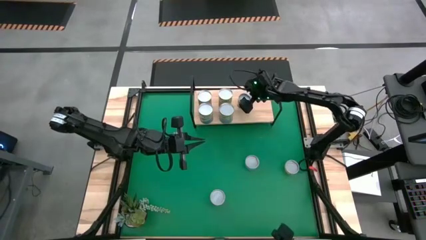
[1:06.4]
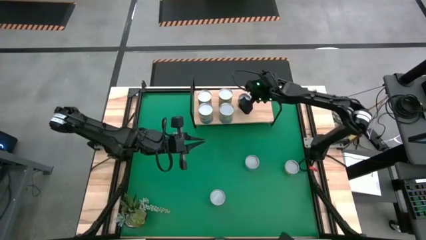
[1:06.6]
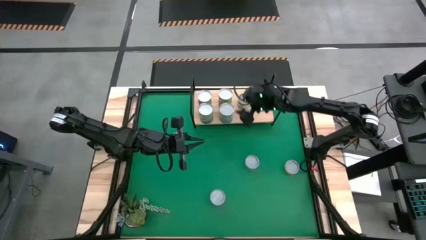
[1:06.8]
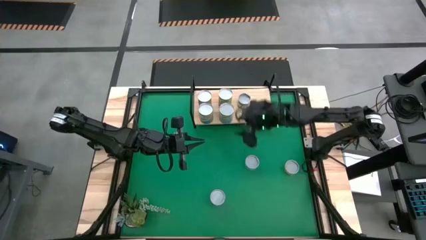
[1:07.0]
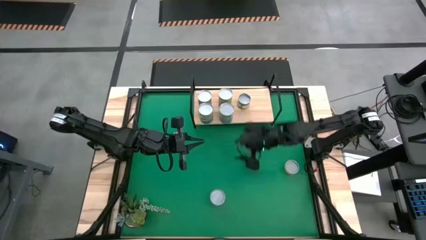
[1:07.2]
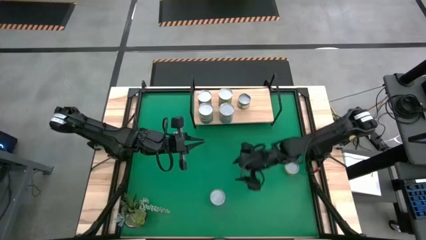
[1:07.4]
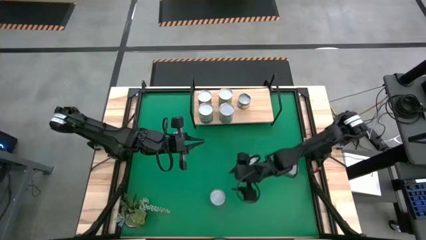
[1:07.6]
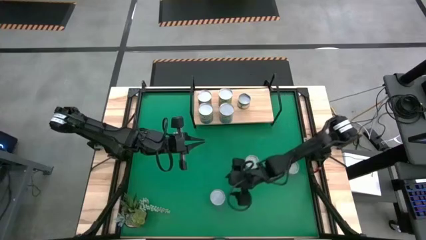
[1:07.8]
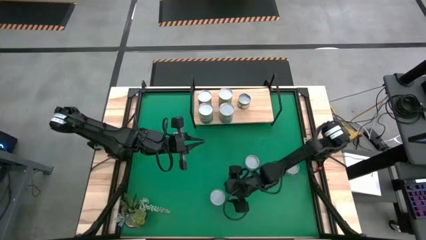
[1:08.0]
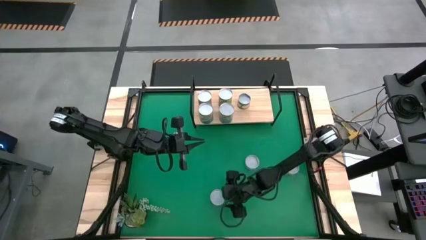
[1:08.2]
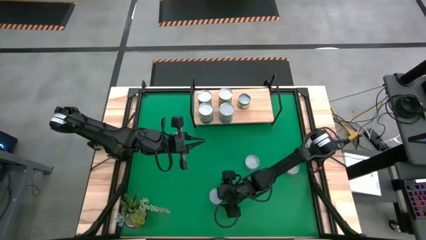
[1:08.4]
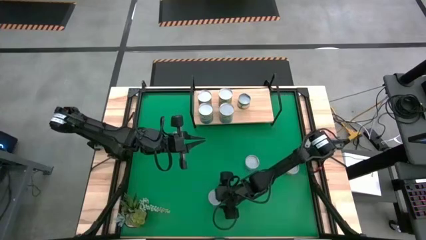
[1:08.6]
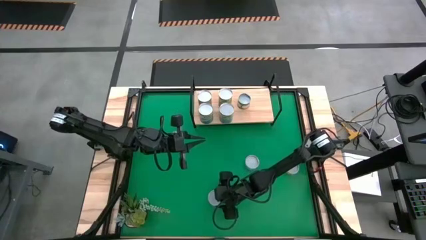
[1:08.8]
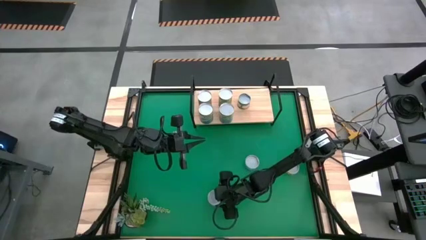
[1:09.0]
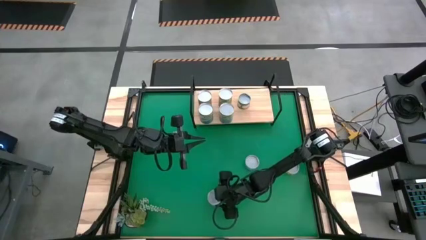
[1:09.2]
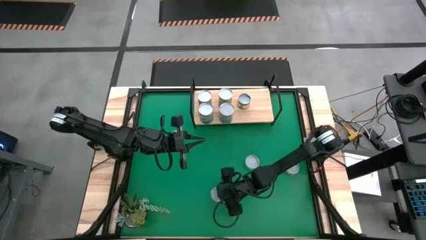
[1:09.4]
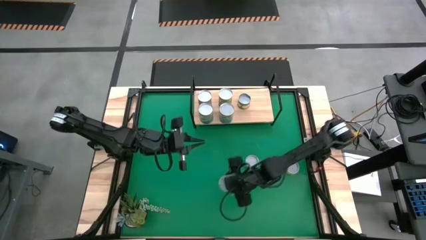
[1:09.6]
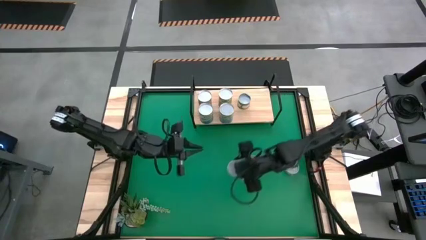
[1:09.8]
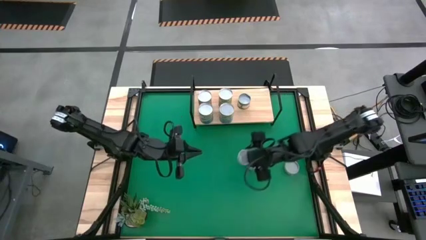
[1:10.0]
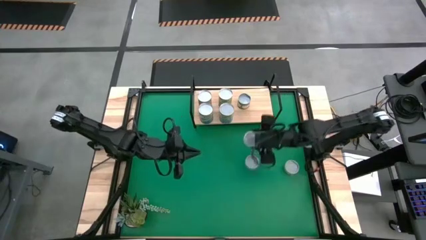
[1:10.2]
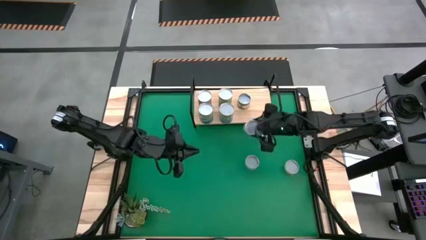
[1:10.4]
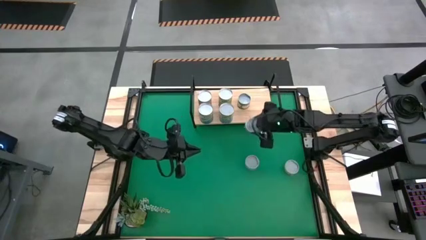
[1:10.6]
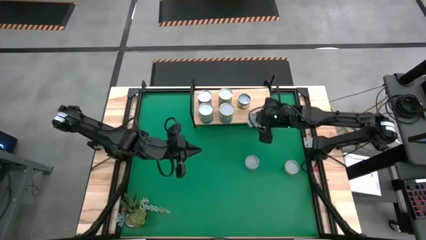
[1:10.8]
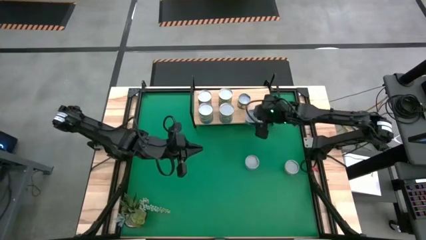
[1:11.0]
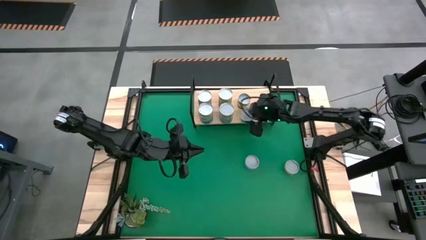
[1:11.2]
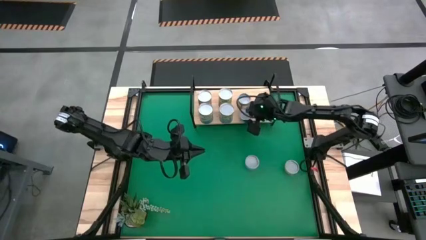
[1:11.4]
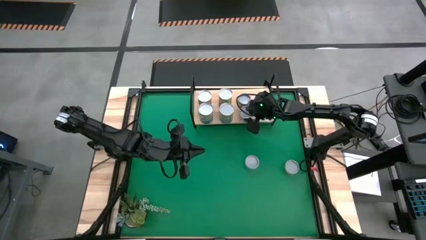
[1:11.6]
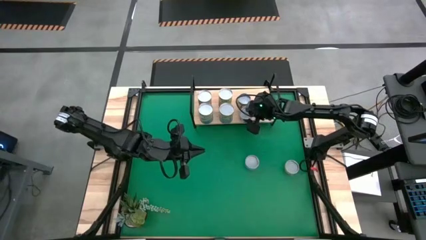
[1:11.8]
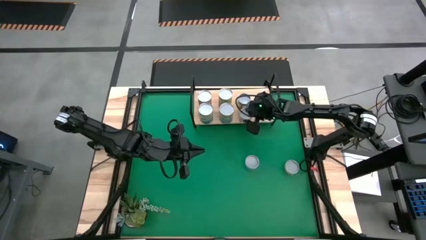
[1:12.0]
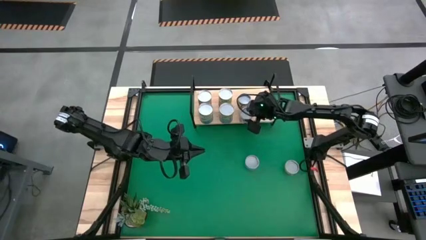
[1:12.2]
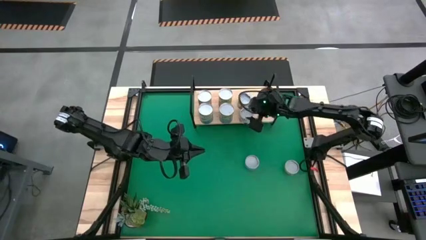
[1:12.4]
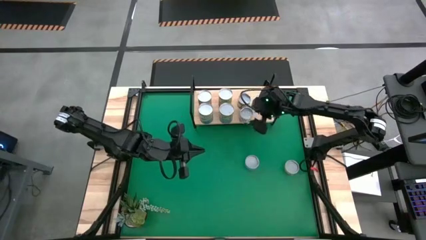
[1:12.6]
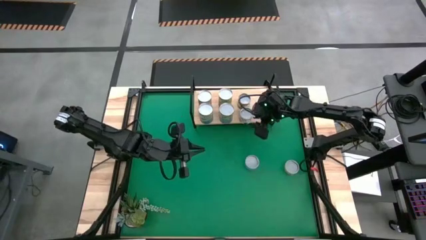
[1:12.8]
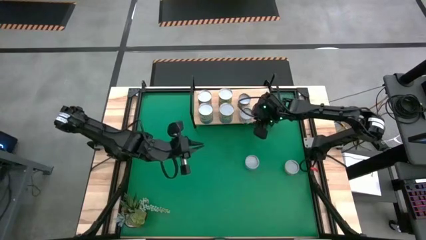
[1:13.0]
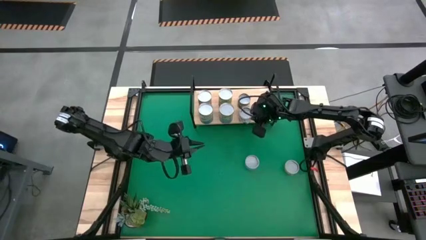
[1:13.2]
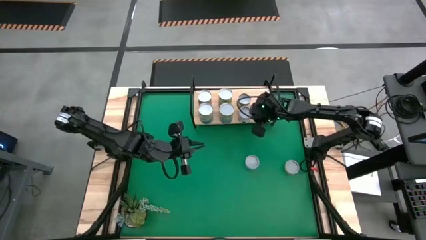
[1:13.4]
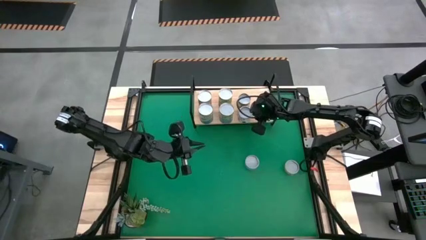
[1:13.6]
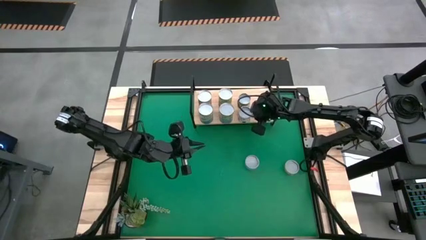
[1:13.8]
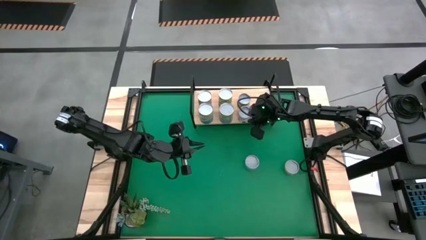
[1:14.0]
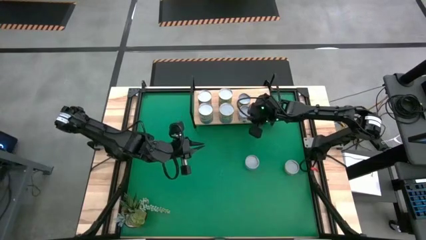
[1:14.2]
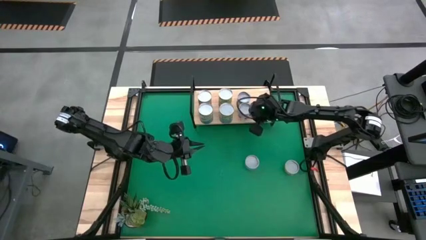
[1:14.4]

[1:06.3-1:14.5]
Task: Pick and place cans onto a shelf
Put the canned spaghetti sauce on the shelf

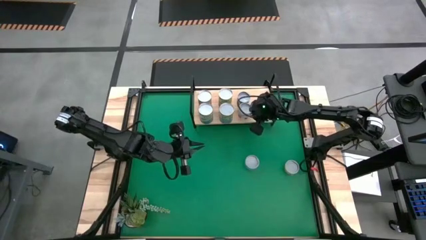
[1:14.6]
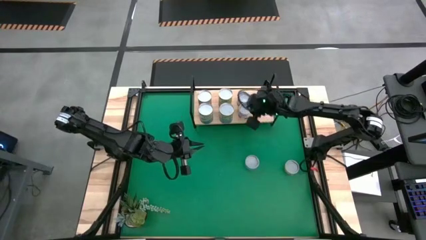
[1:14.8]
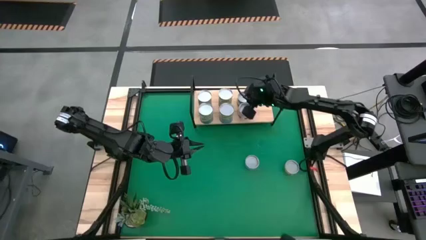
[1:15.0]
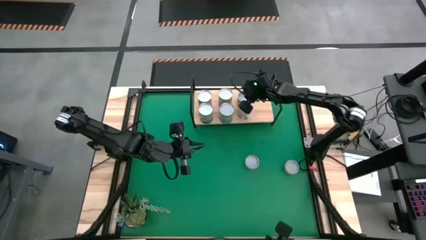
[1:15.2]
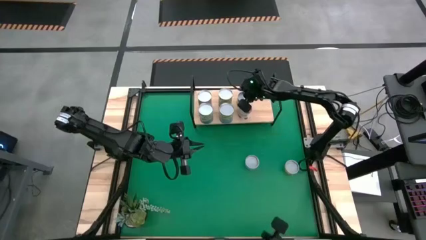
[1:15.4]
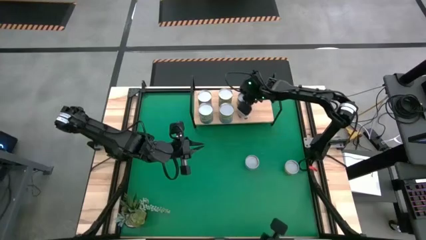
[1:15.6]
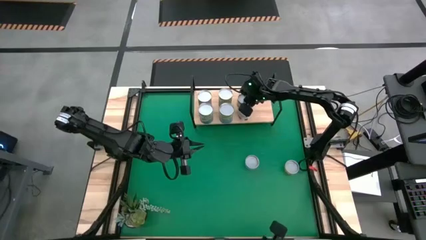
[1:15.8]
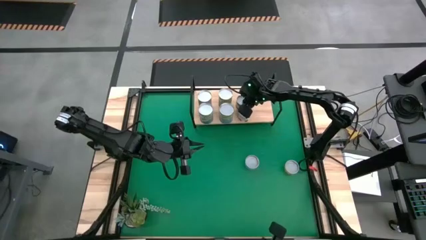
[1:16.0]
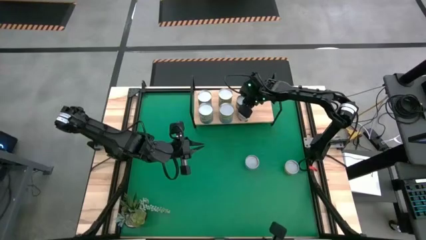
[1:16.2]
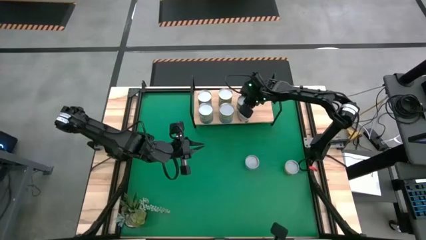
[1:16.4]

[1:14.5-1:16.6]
Adjust the canned peaches on the shelf

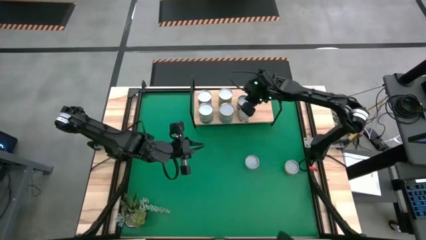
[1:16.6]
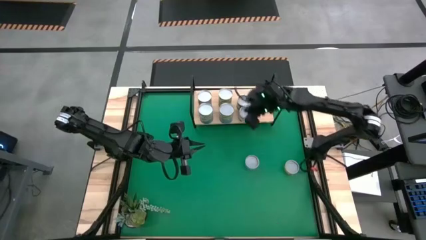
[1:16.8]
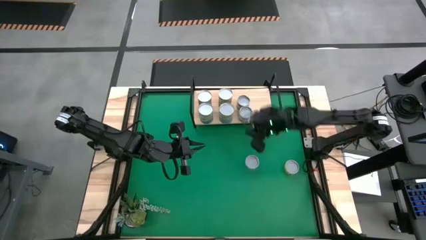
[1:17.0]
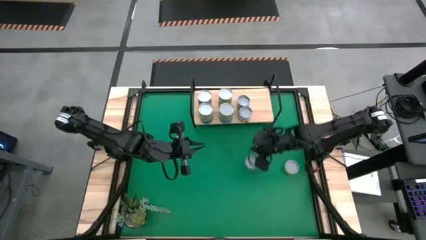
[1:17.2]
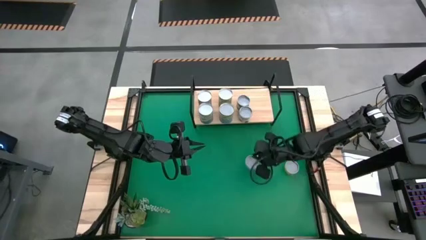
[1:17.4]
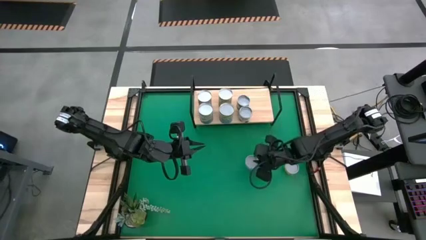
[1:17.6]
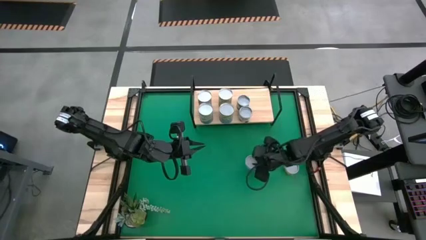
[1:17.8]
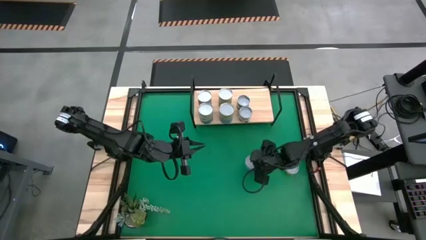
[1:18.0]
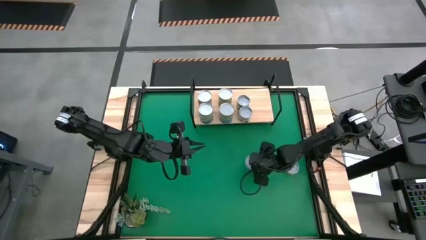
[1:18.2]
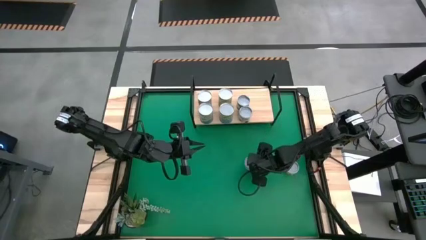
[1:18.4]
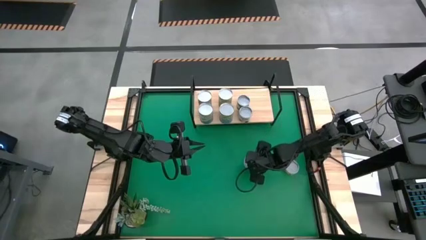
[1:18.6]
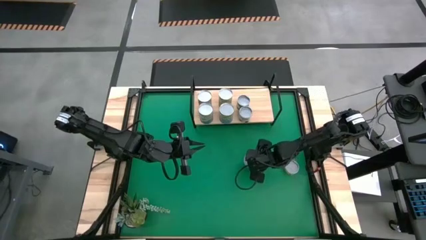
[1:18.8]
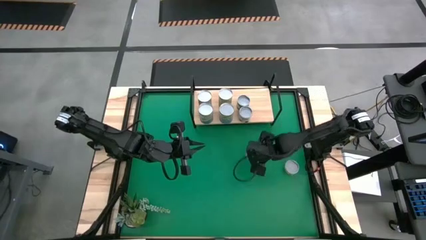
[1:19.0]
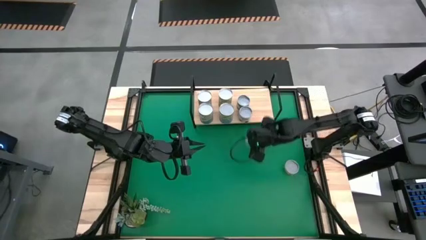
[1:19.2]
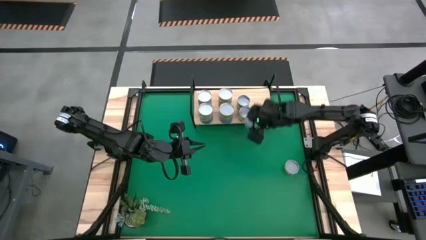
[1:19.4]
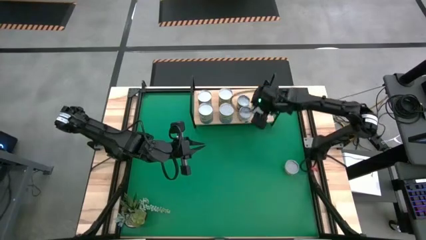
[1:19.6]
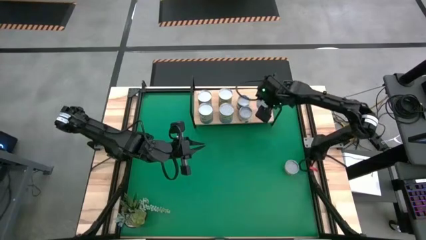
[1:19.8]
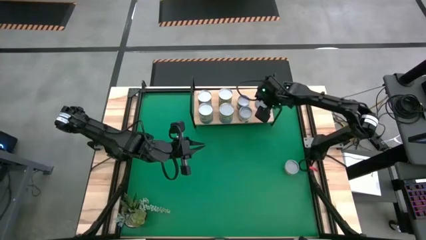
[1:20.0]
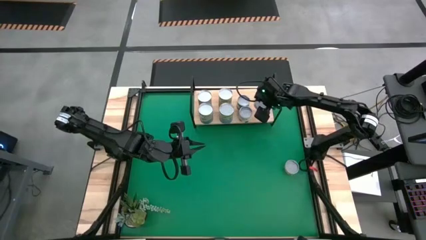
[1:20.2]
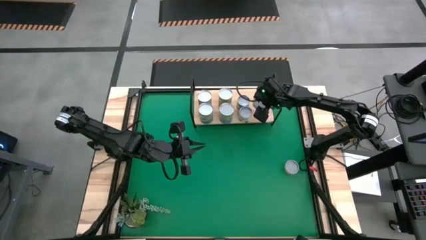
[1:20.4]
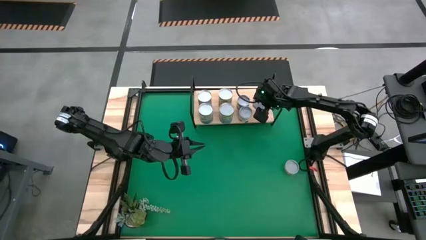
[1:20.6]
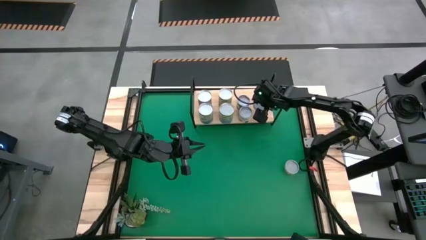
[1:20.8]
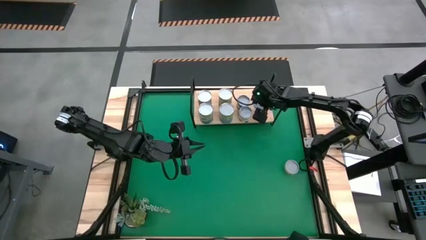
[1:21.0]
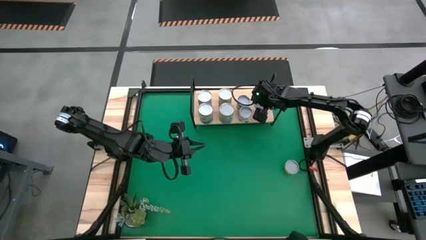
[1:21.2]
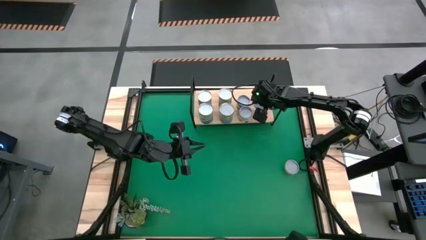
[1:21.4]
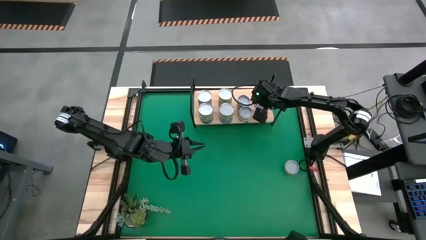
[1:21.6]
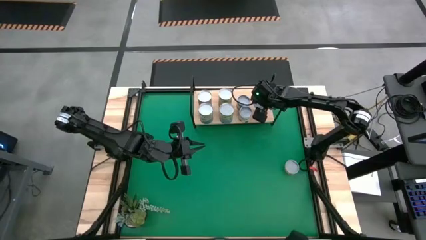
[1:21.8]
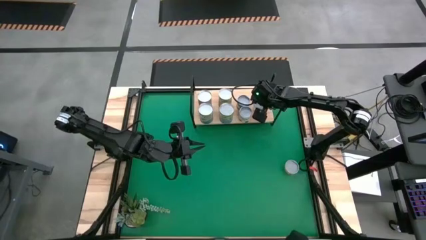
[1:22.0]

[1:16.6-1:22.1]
Put the canned salmon on the shelf

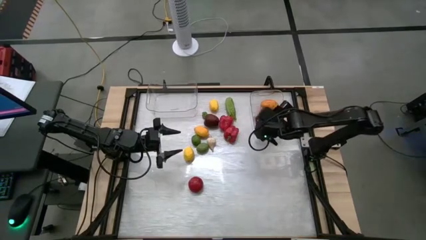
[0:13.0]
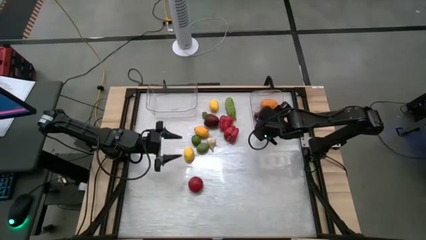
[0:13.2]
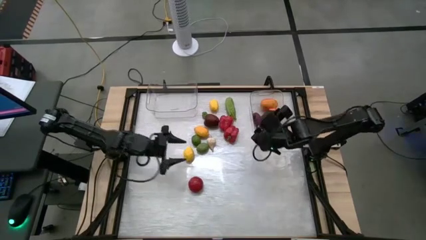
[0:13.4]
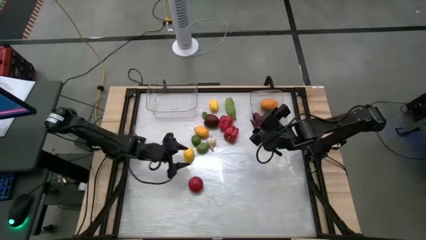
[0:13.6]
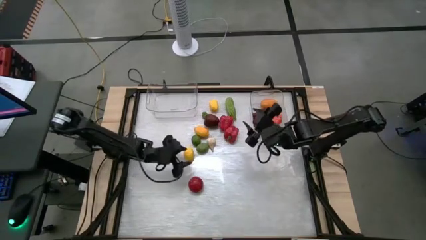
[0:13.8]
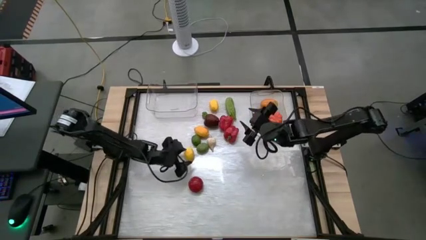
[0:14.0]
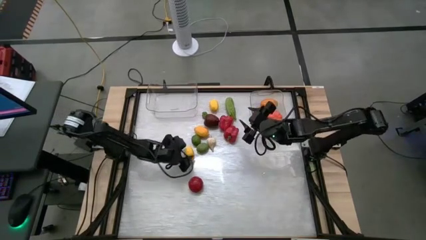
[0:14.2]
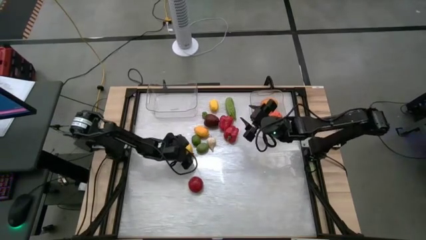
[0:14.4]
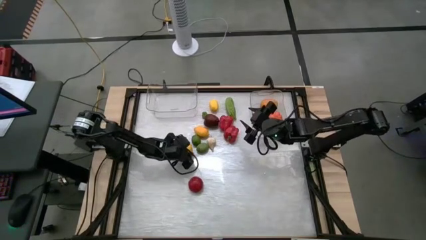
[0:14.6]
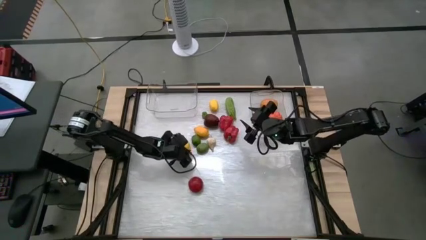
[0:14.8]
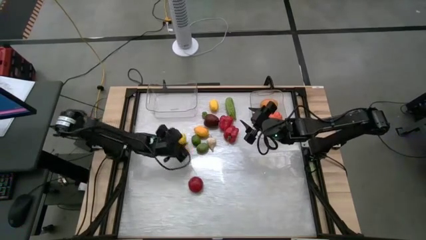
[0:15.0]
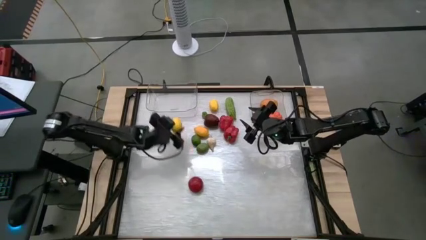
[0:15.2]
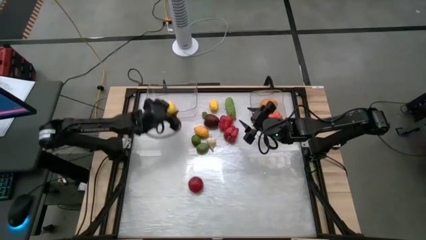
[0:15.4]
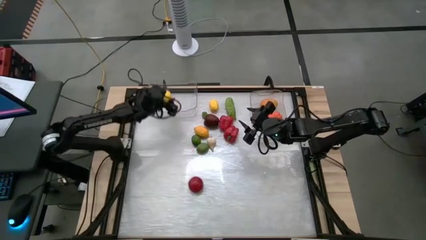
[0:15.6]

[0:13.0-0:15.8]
Task: Sort produce into baskets
Put the bottom yellow lemon into the left transparent bin
